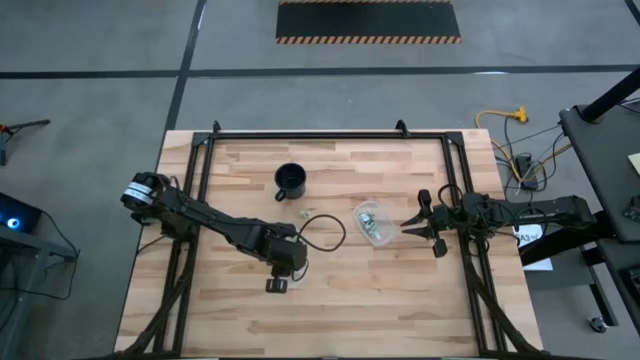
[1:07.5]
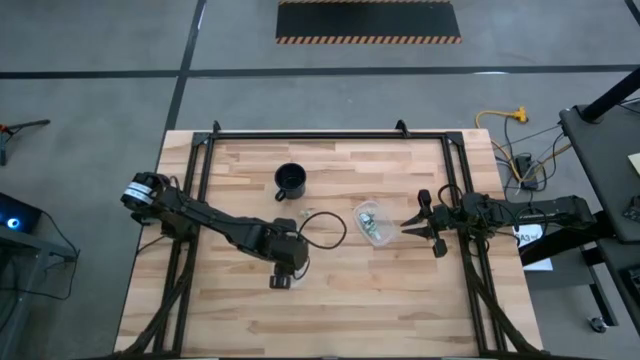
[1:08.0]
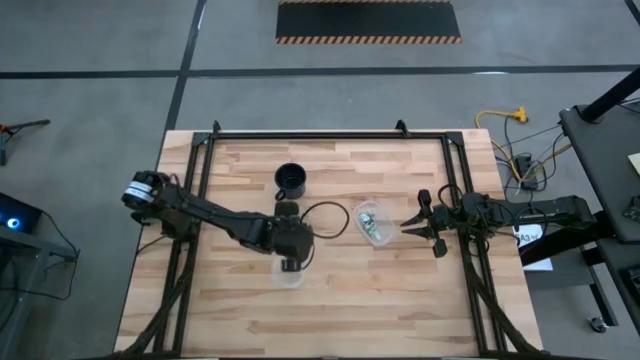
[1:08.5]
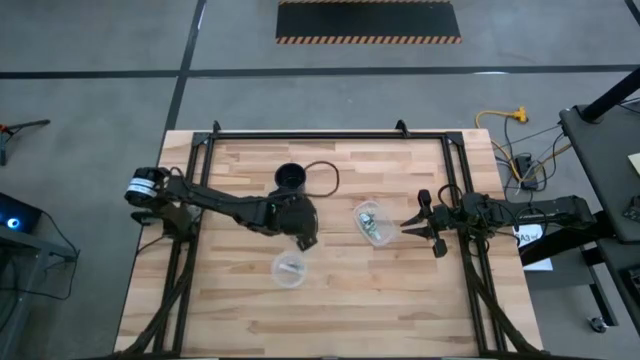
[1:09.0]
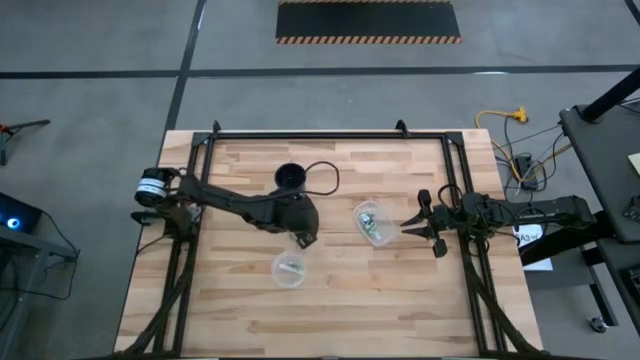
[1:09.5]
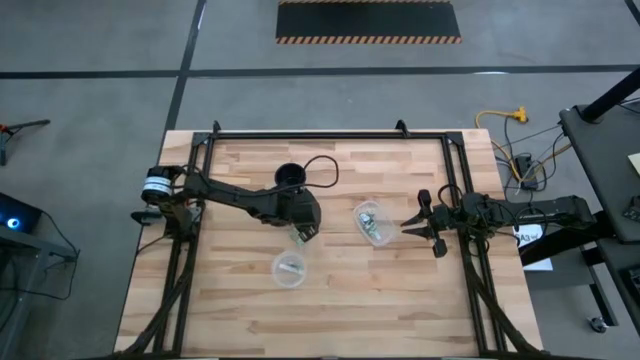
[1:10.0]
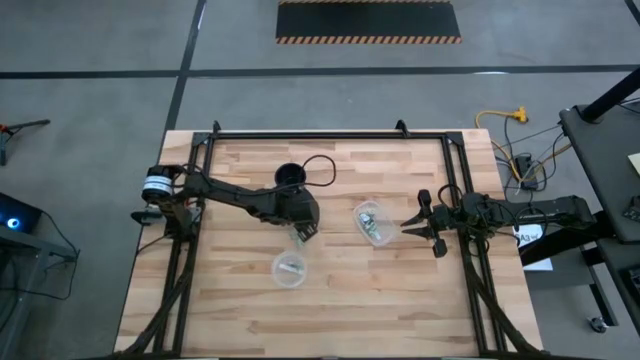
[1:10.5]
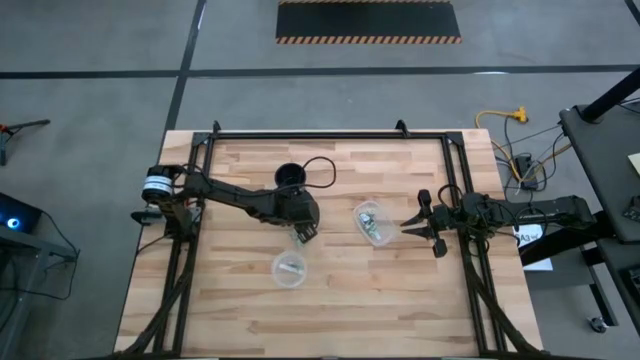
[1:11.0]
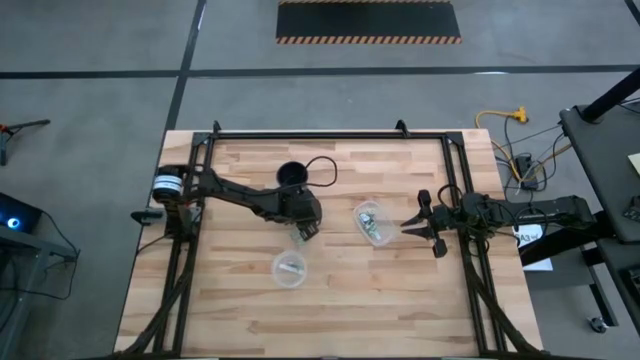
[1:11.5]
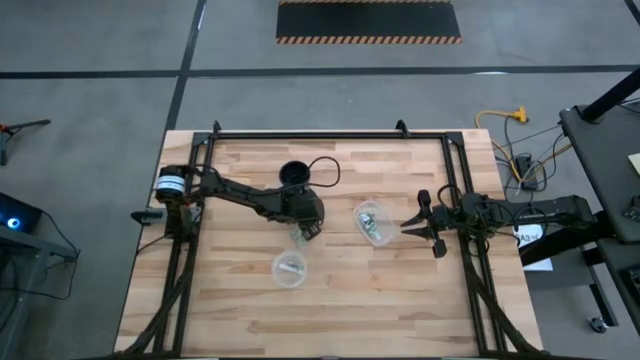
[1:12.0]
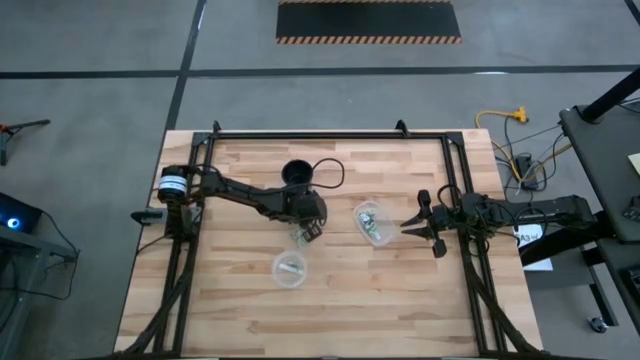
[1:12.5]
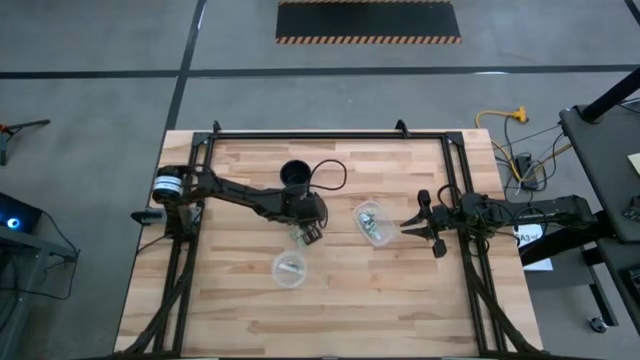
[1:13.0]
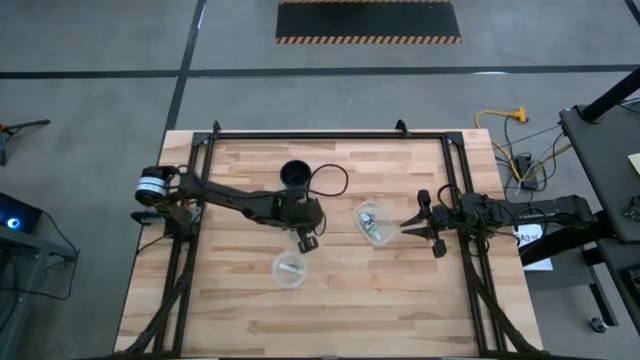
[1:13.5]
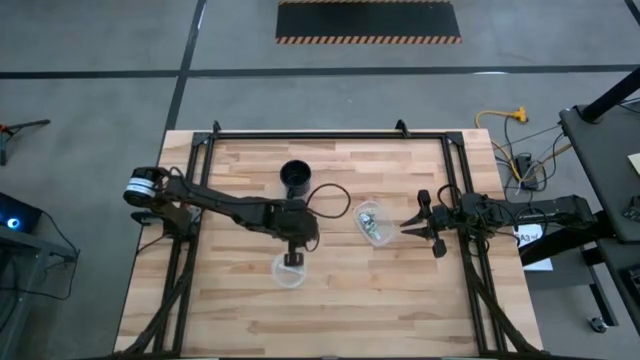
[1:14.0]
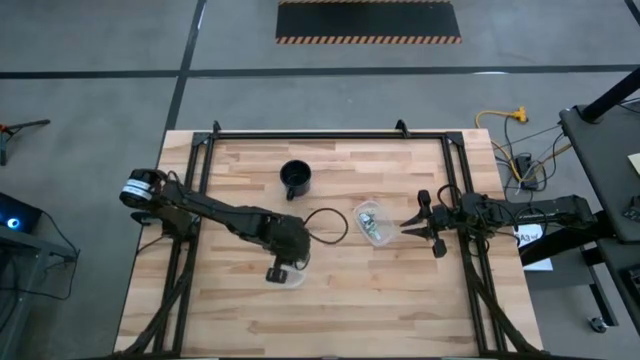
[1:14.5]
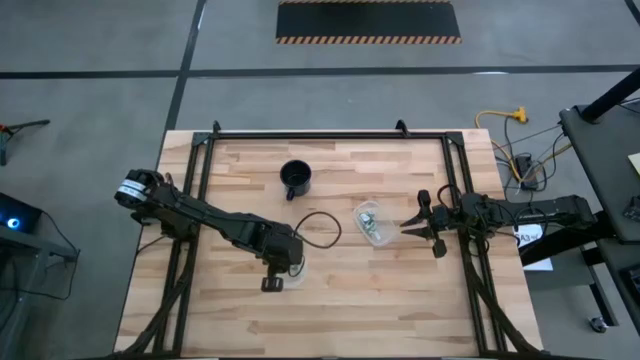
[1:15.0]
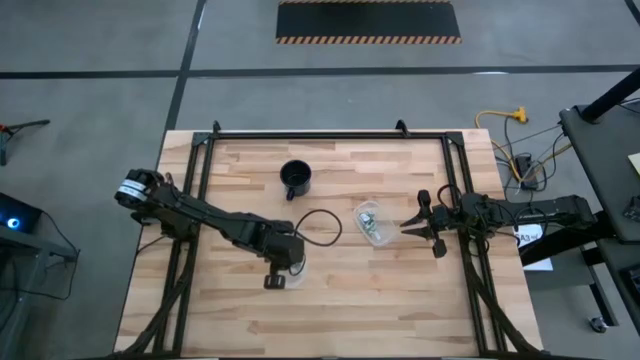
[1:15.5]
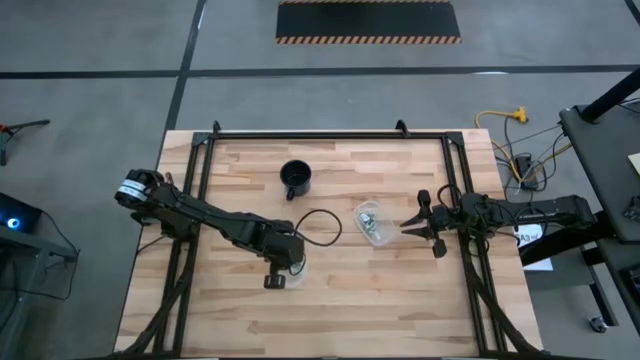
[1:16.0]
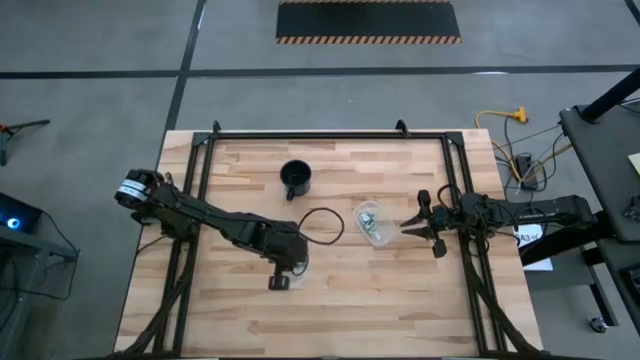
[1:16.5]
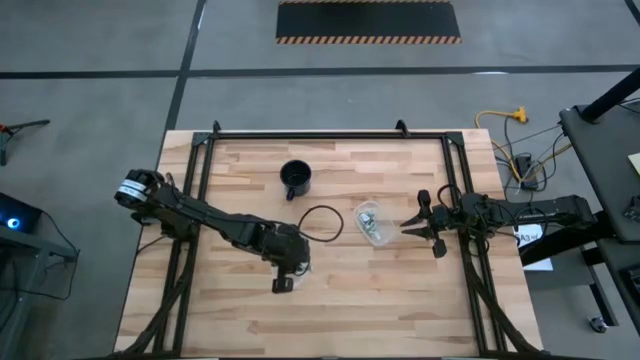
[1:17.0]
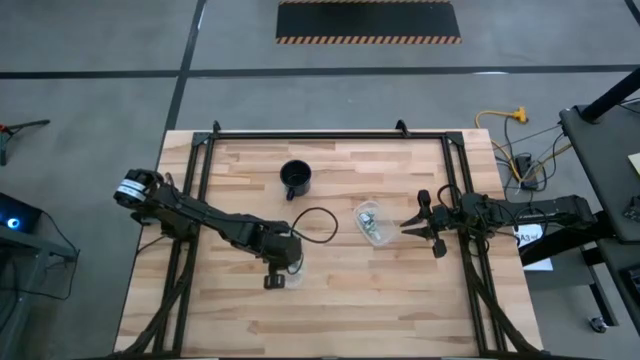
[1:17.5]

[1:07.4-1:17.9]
Task: Pick and place Stevia / Truvia into bins
Put the white stevia packet into the bottom transparent container

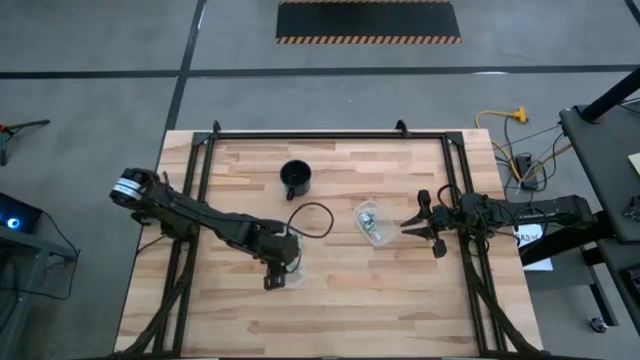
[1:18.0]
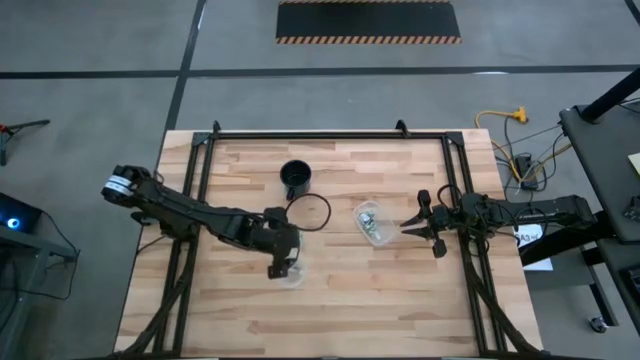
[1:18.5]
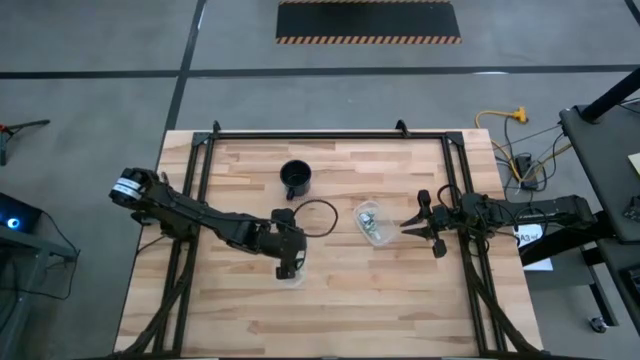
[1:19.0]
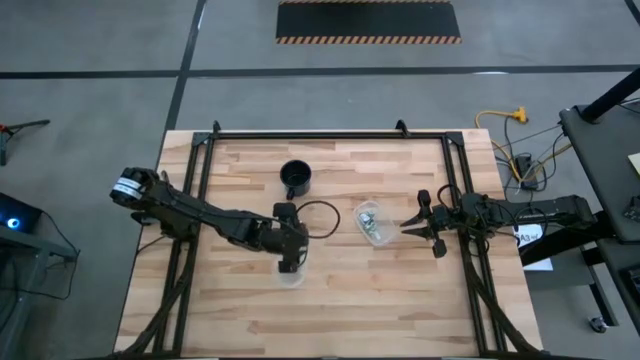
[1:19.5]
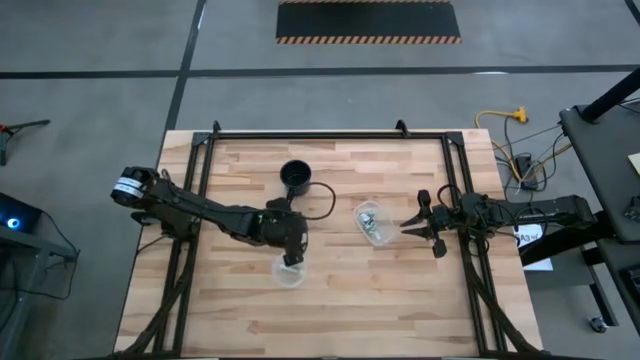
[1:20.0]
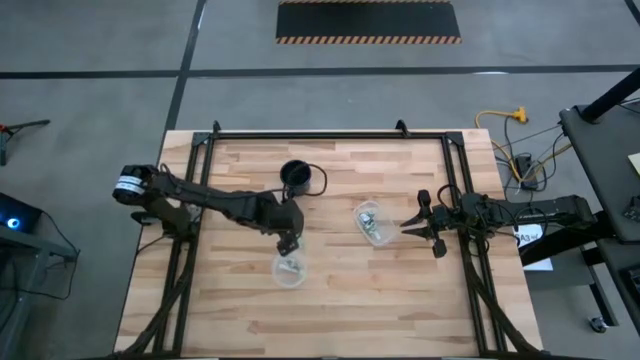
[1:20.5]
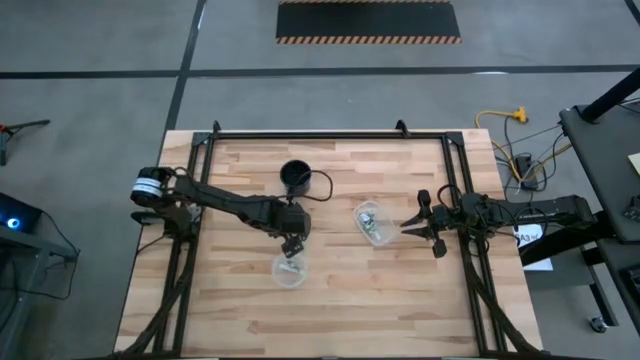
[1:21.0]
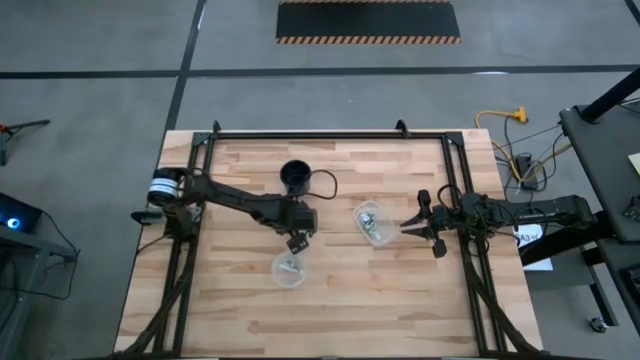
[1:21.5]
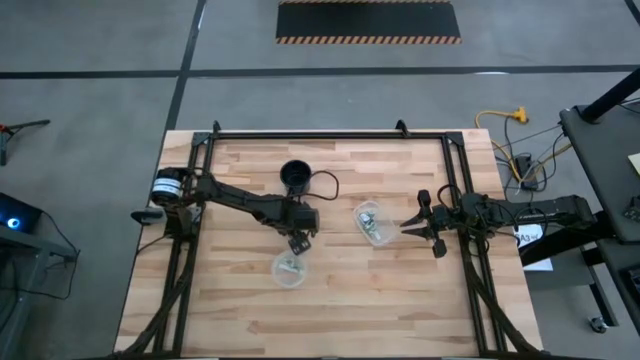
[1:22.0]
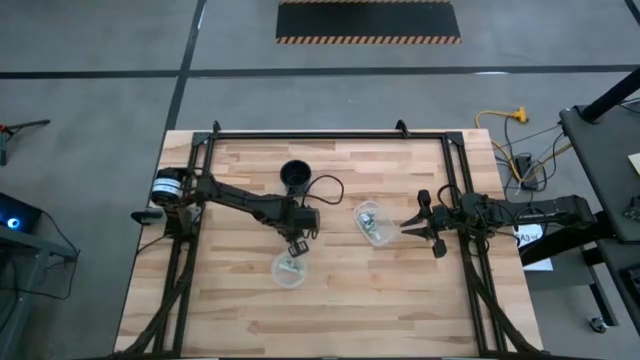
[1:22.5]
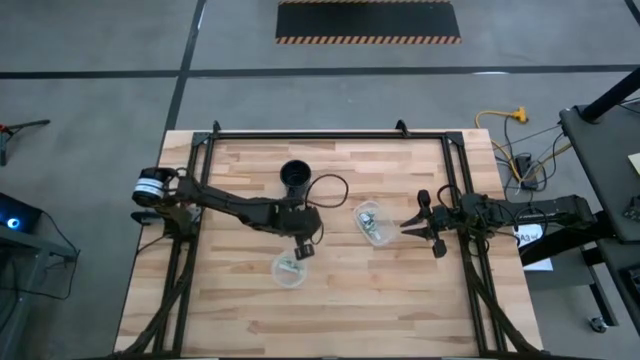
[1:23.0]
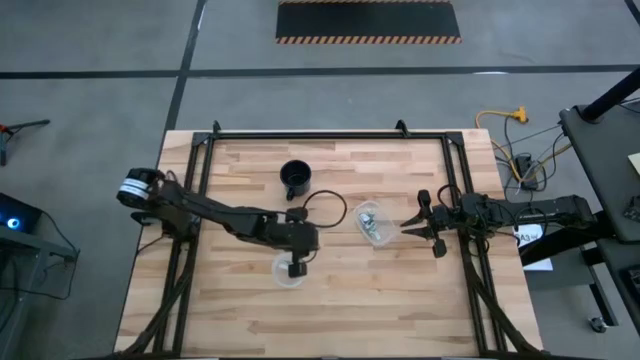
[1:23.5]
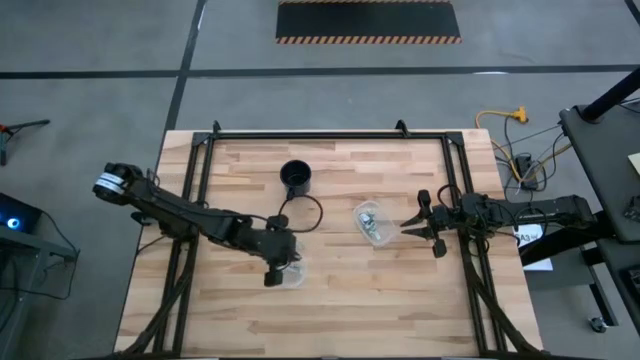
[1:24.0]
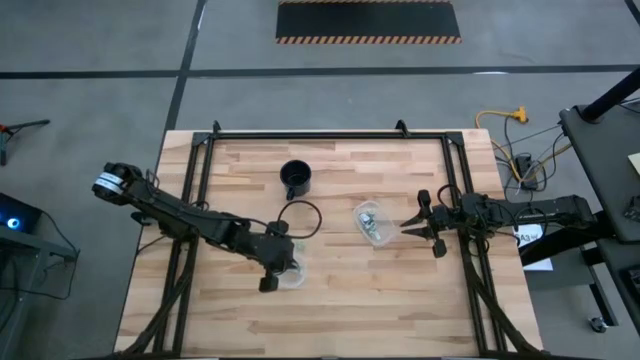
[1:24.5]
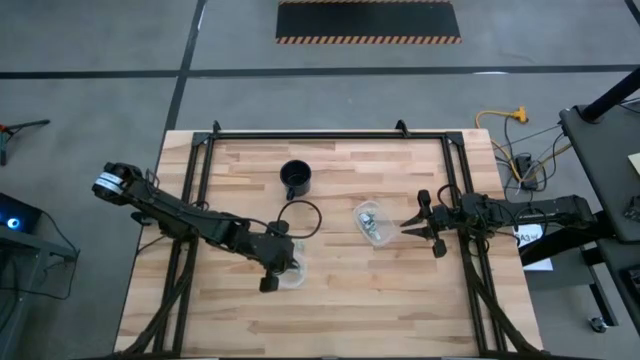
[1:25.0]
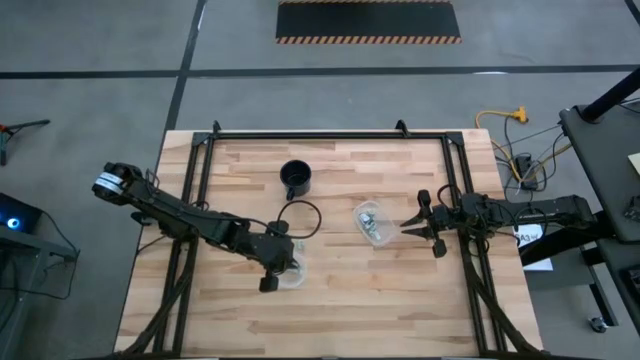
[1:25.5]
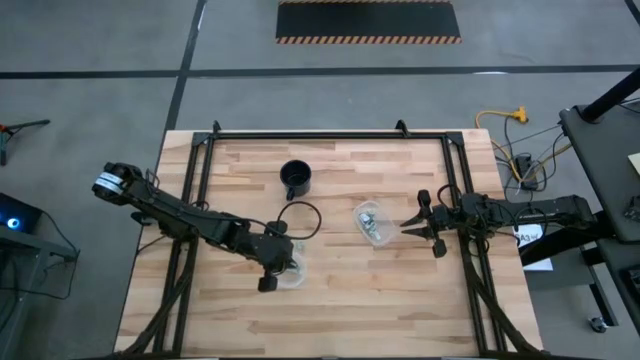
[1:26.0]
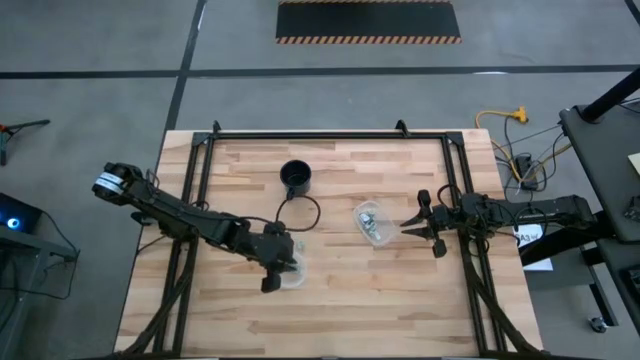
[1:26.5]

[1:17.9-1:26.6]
Put the white stevia packet into the bottom transparent container

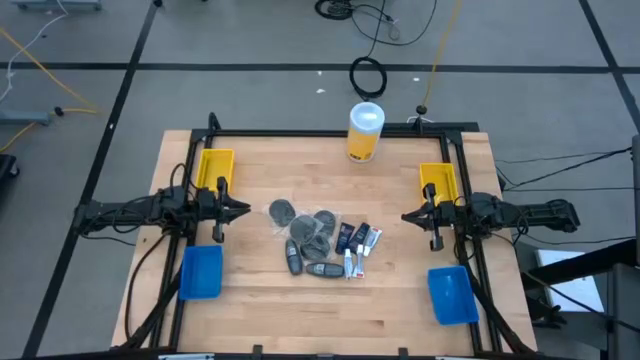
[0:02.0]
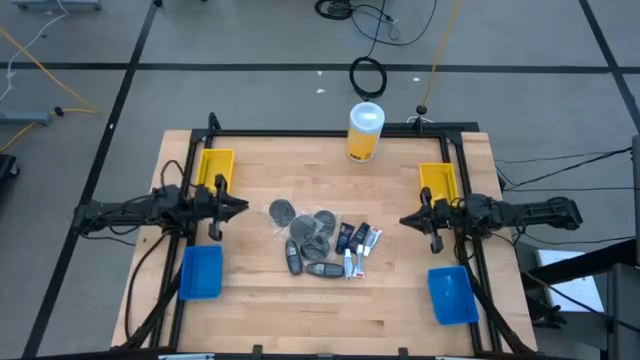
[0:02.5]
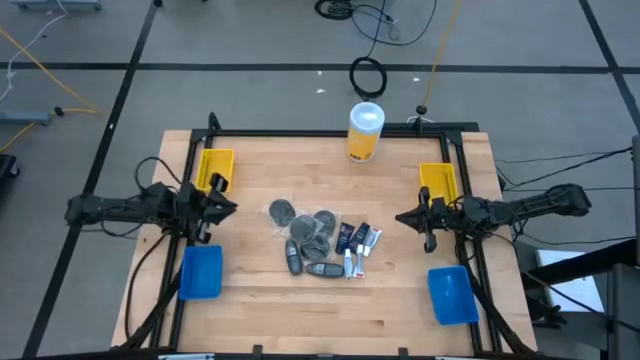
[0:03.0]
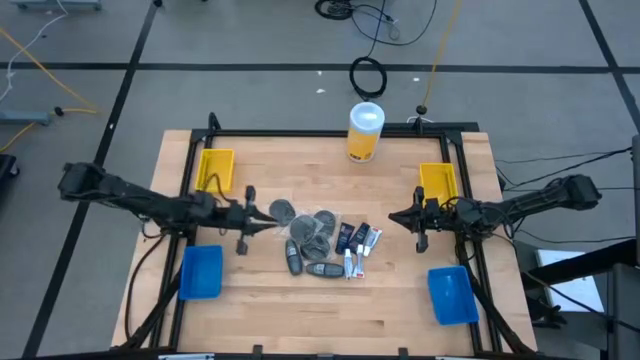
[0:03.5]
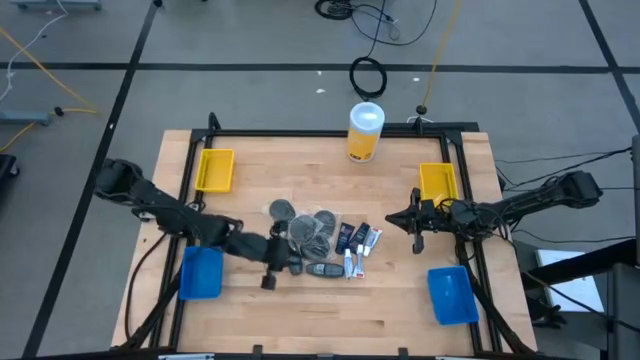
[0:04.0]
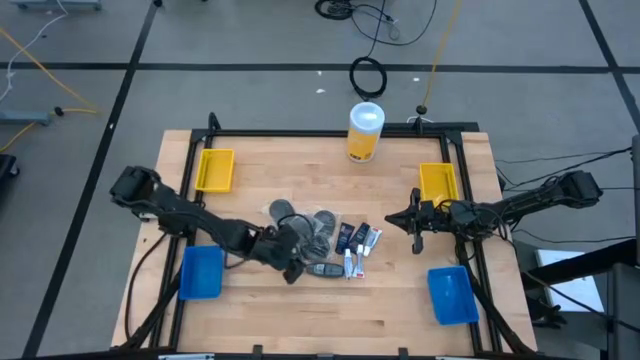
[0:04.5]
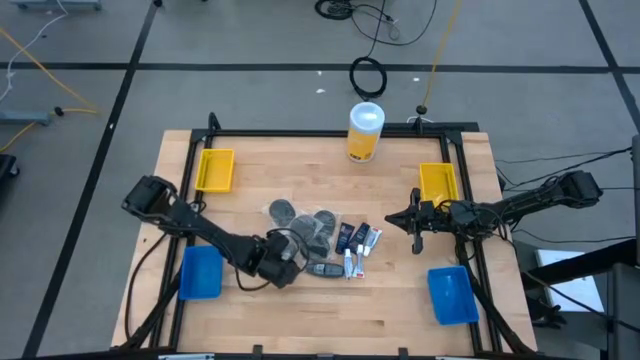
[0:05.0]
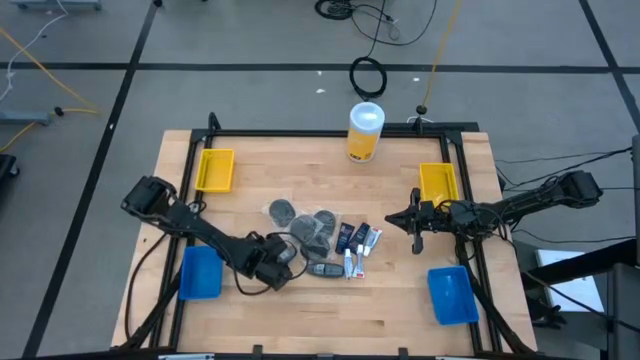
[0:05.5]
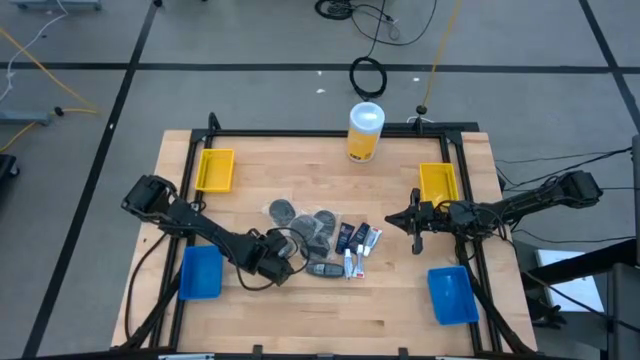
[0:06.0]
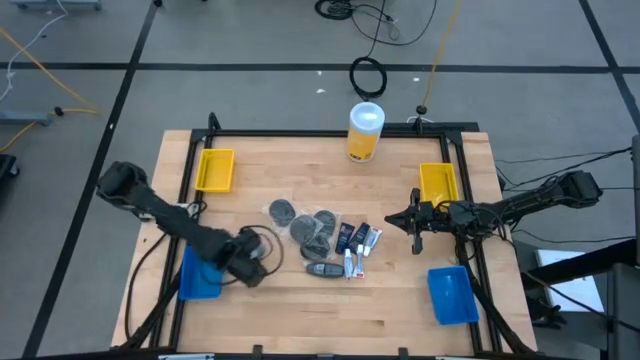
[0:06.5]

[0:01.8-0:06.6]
Task: Pick & Place Travel size toiletries
Put the gray deodorant into the left blue bin
